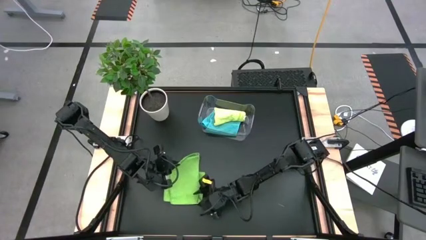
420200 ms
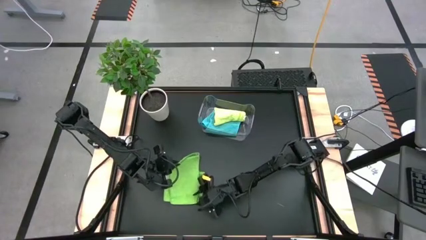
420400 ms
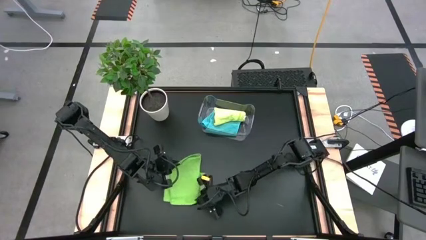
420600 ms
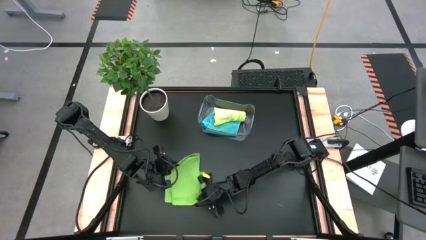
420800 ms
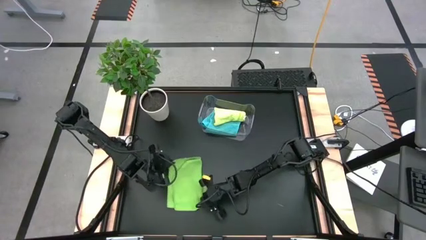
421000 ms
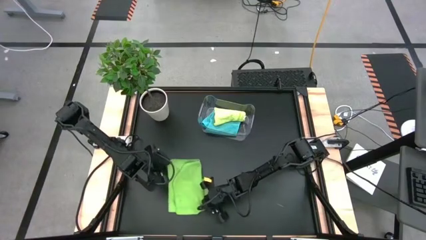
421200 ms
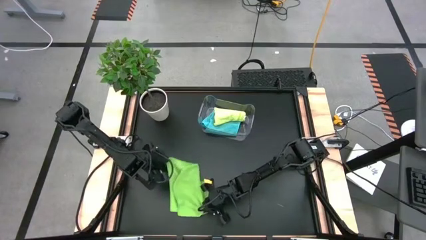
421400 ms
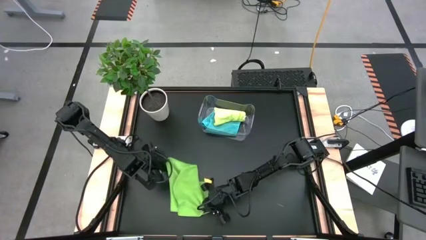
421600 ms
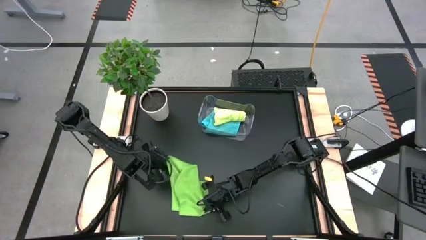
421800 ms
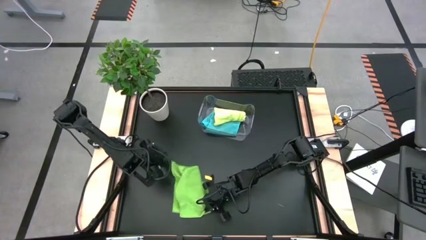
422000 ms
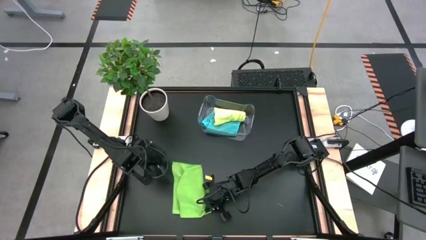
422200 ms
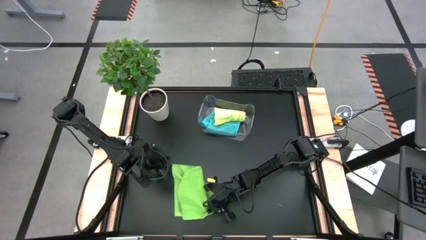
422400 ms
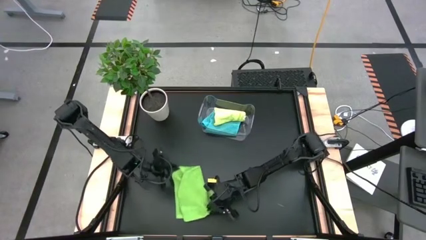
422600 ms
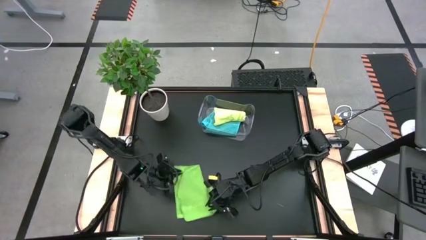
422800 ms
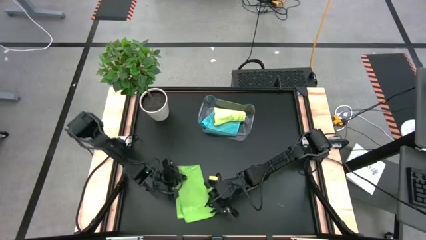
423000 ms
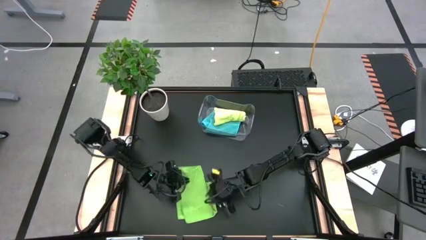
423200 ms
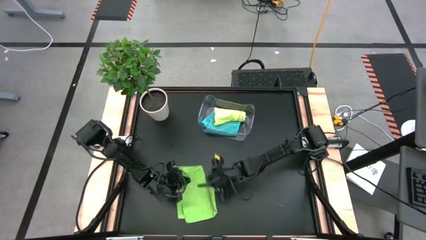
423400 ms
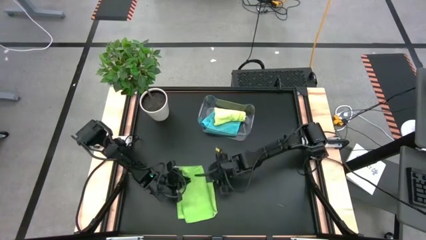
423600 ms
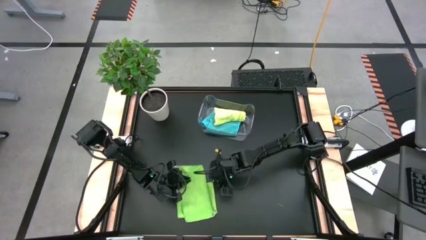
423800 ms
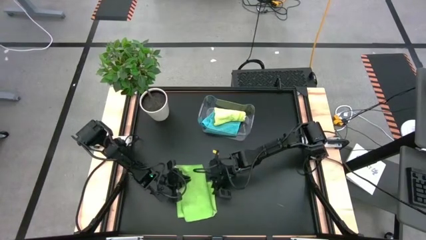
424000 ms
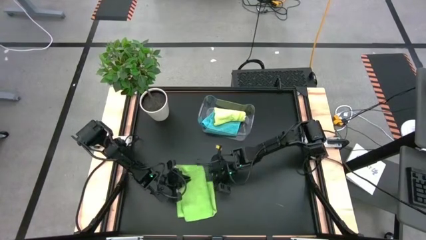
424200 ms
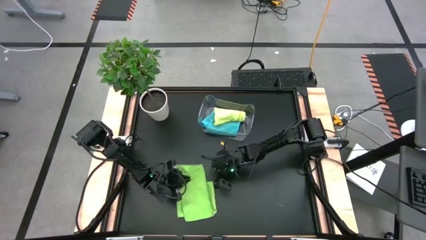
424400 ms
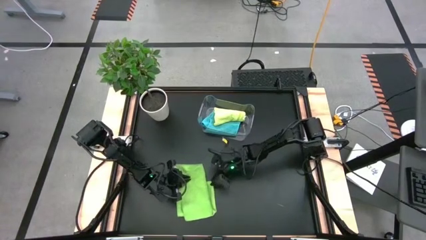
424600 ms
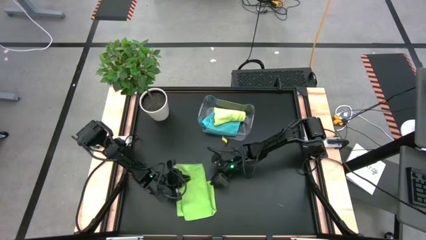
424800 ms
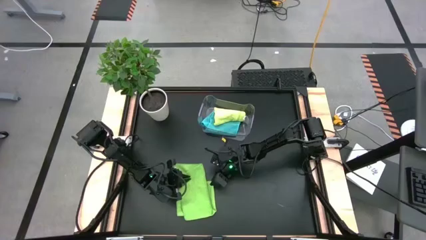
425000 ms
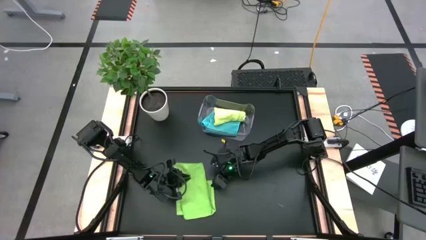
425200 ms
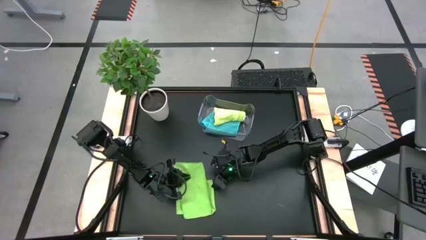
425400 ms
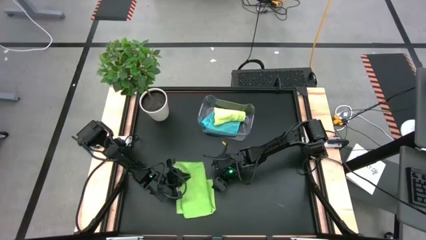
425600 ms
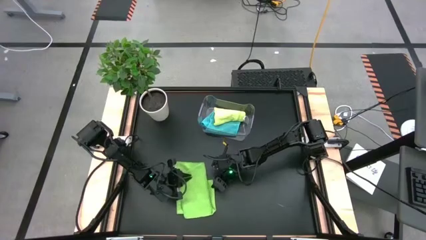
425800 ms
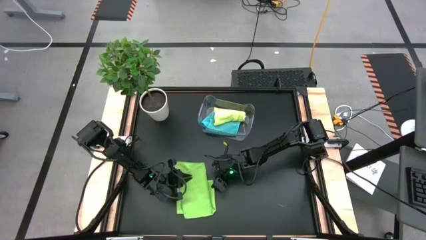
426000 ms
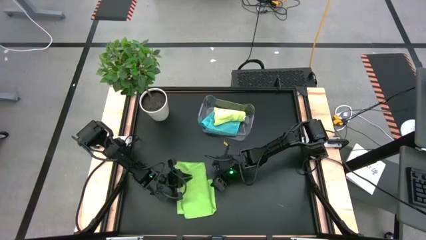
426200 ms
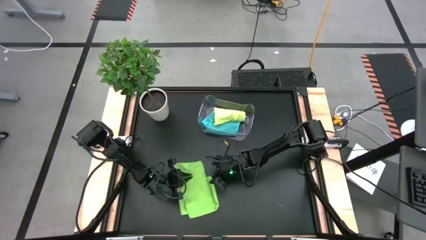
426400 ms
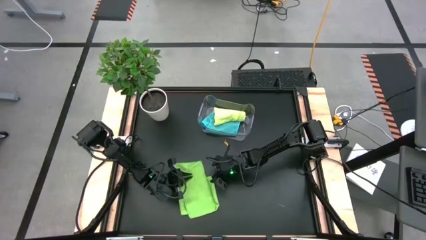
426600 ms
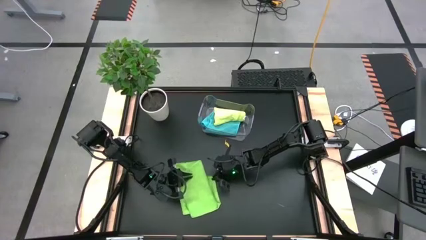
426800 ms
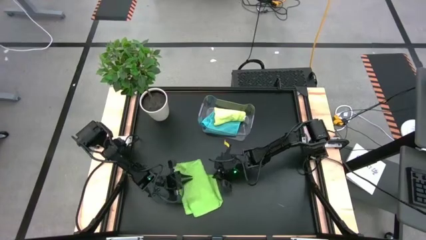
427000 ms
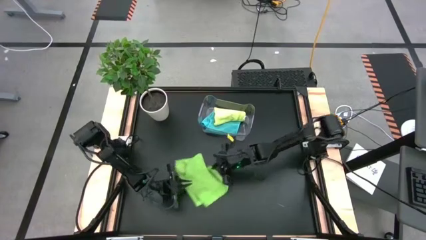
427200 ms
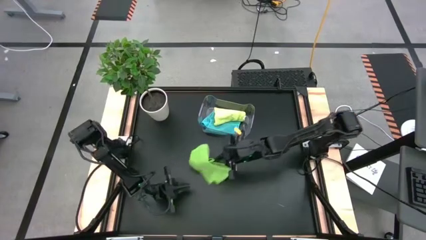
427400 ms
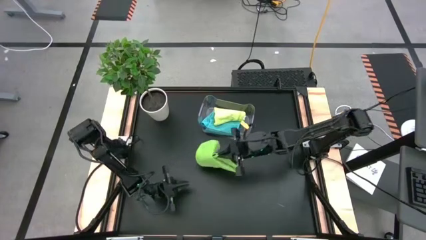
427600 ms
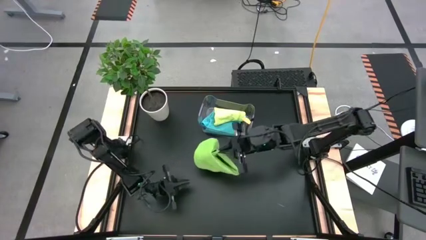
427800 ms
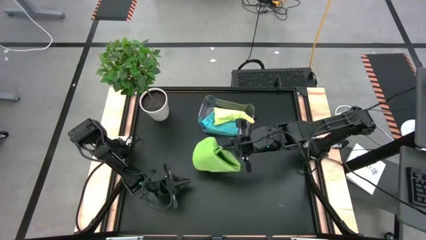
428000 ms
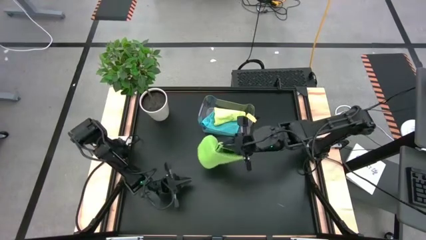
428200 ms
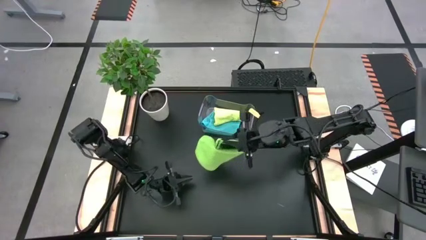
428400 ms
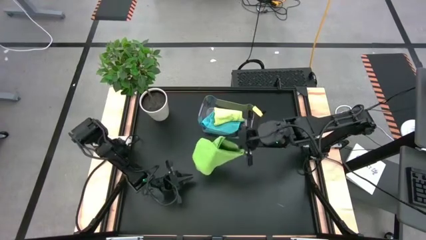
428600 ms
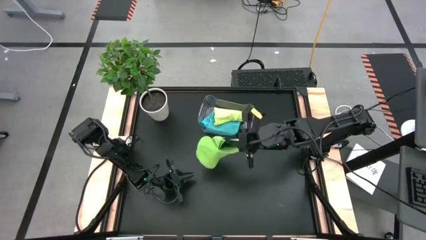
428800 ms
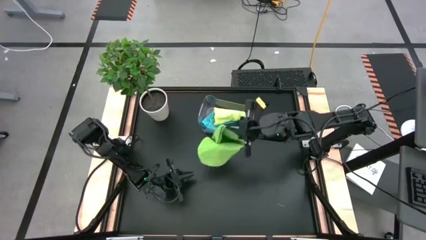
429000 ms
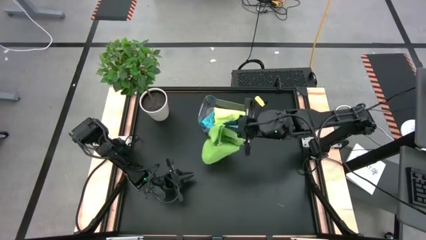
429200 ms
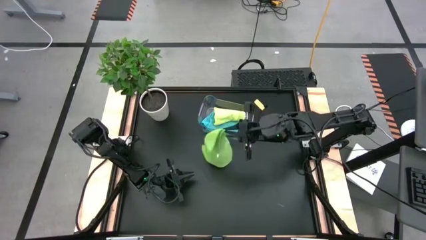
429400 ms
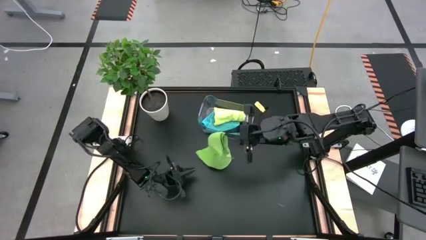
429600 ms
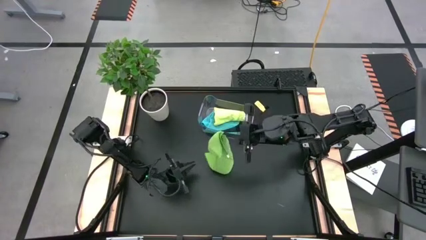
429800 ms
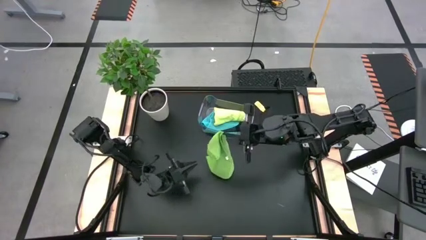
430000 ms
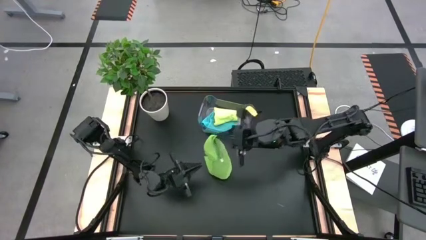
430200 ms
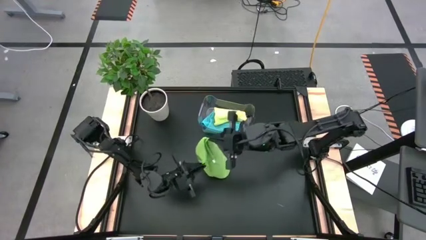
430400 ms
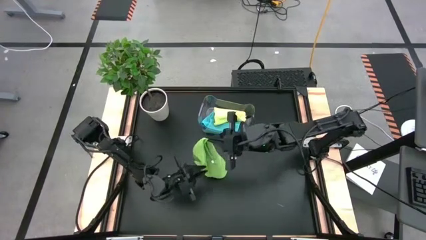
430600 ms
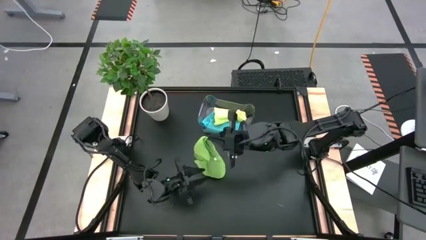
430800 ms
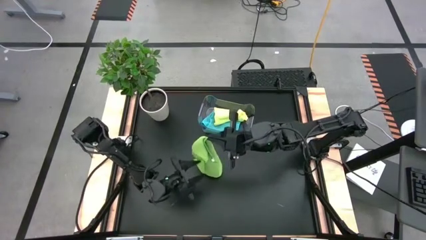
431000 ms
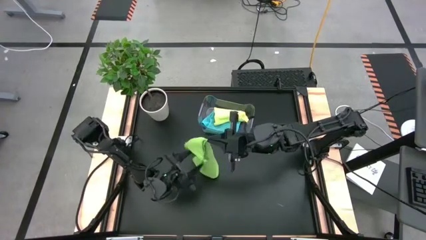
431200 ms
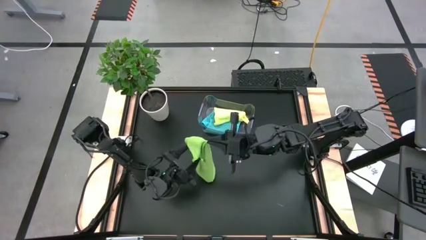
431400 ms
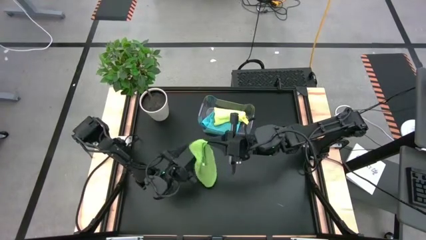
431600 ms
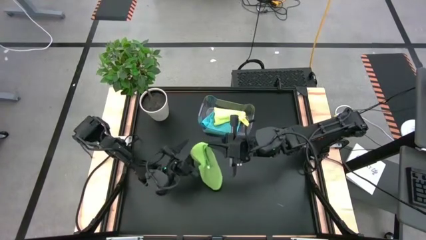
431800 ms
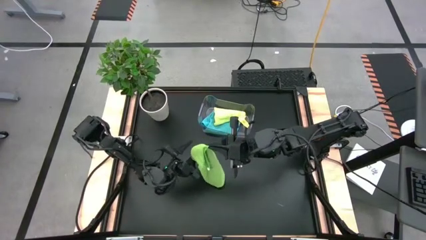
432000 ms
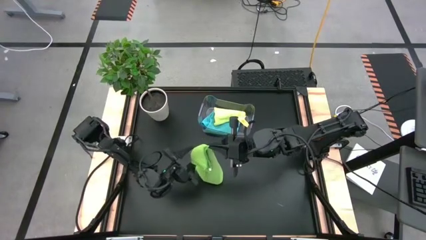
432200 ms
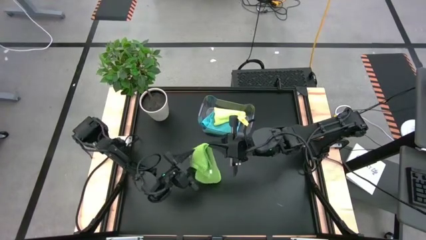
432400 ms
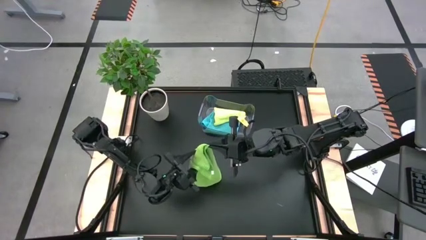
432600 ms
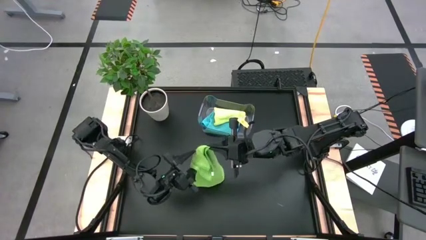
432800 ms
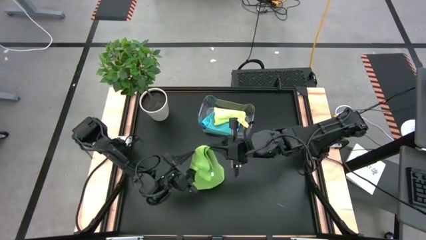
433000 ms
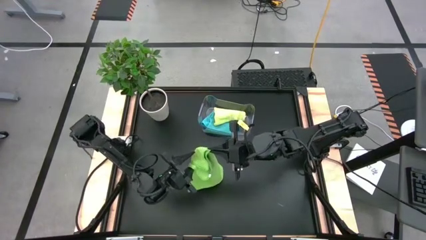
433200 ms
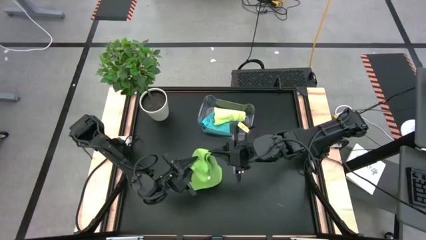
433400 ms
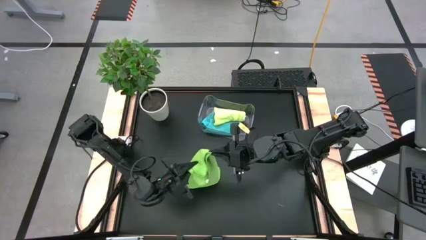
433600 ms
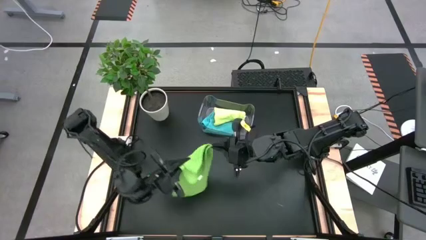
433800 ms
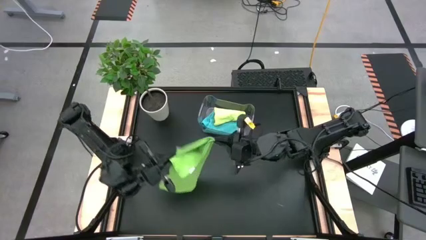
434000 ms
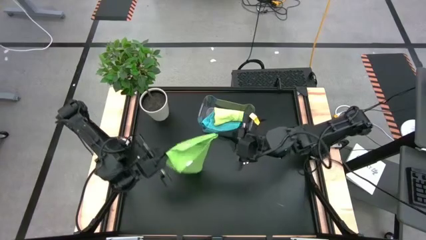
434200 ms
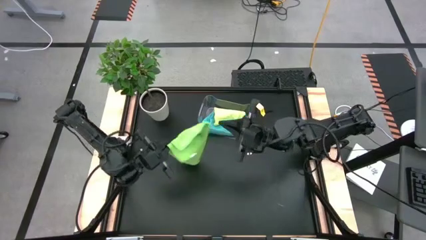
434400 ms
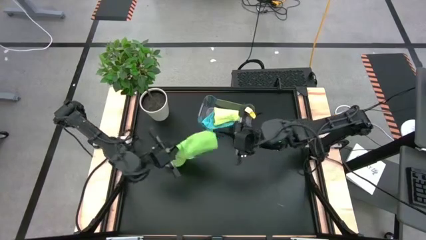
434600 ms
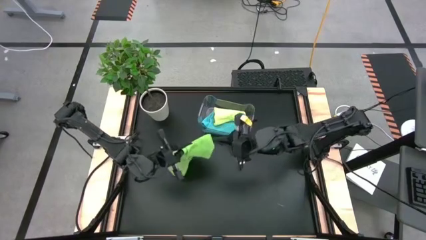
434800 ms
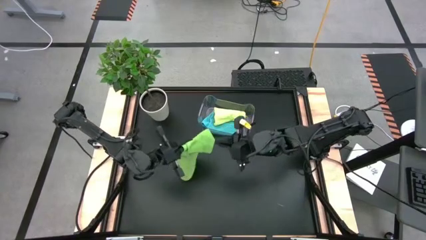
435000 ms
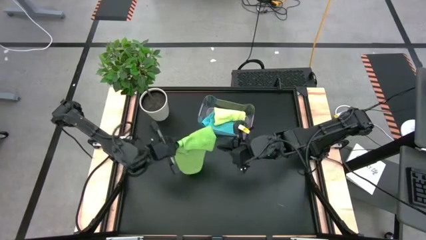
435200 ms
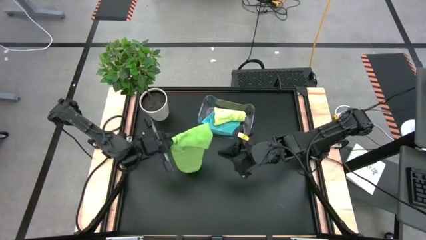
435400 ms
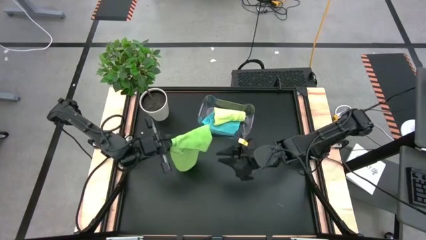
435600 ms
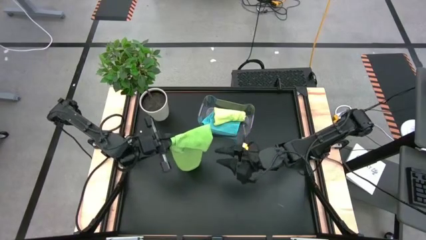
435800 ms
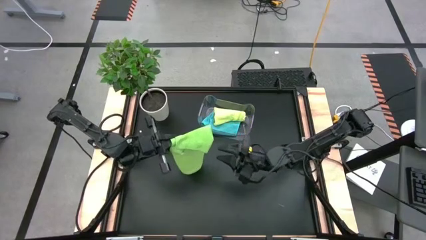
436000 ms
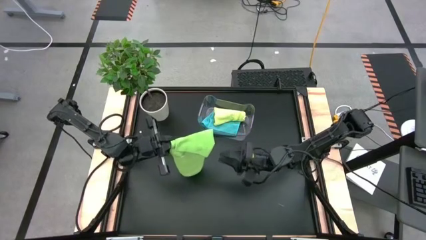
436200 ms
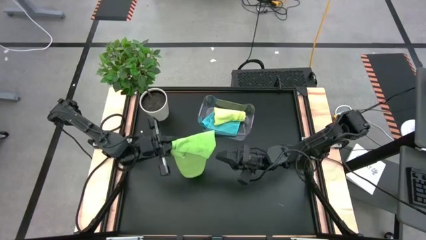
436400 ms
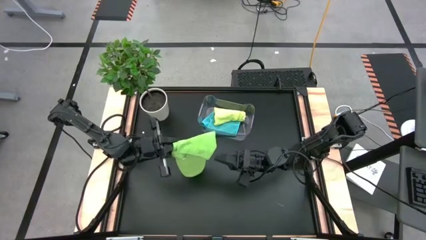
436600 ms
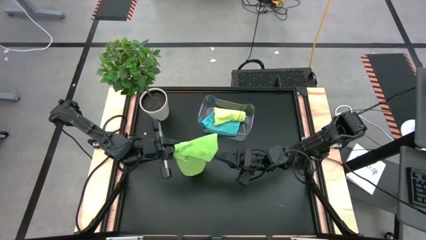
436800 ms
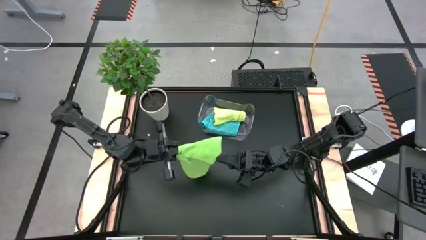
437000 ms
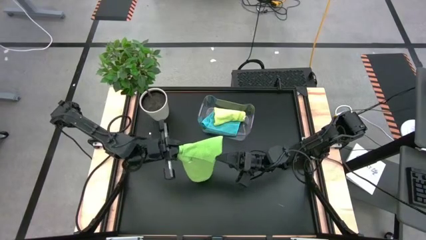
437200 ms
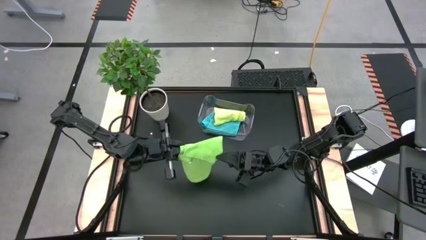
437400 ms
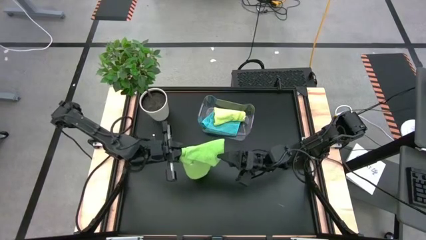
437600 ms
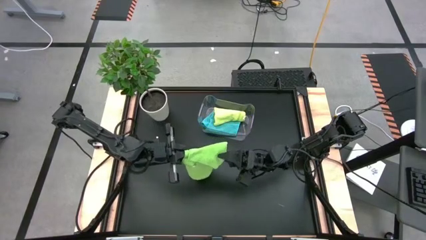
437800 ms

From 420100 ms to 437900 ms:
Task: Fold microfiber towels
Fold the green towel
